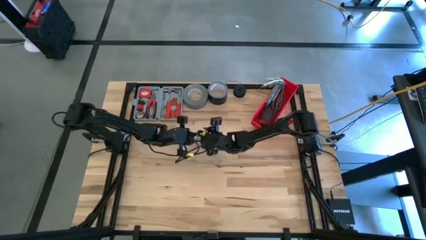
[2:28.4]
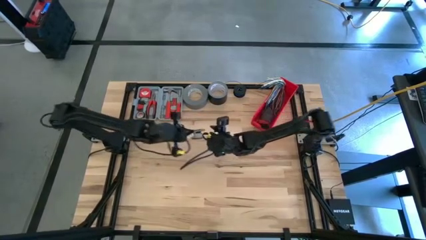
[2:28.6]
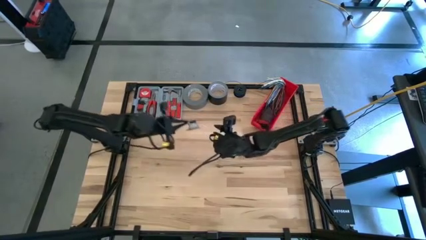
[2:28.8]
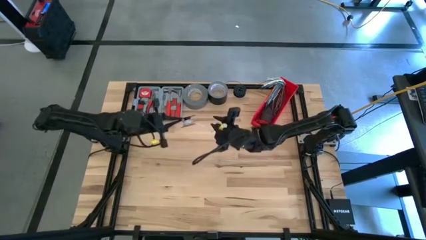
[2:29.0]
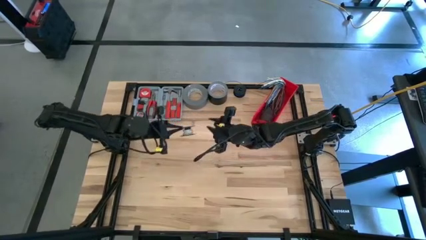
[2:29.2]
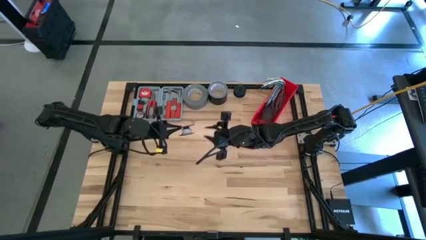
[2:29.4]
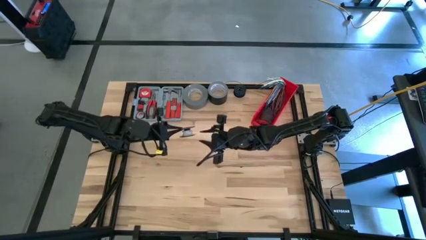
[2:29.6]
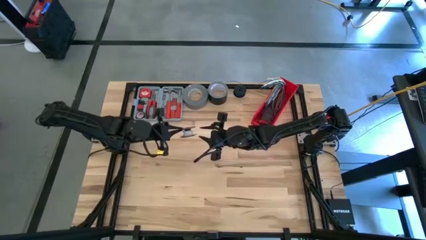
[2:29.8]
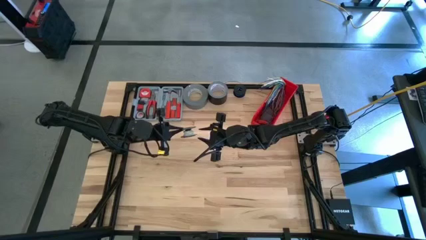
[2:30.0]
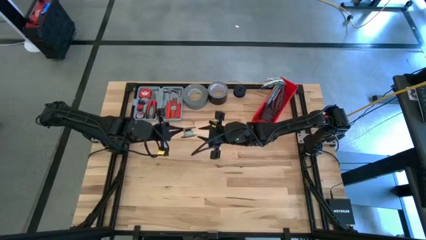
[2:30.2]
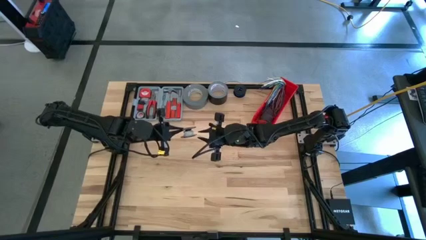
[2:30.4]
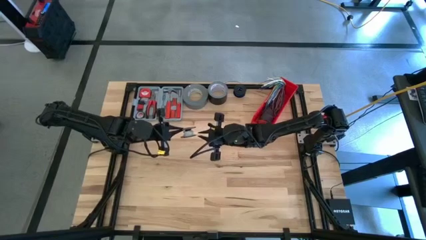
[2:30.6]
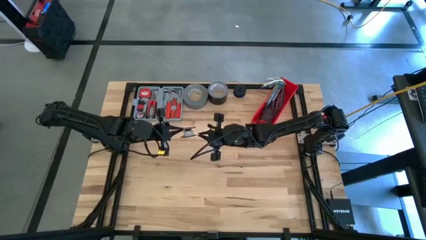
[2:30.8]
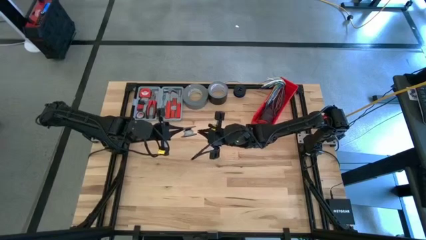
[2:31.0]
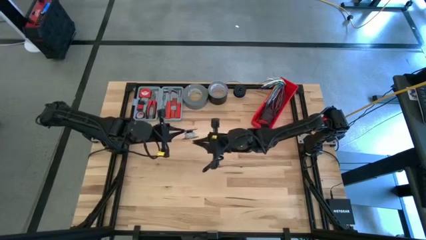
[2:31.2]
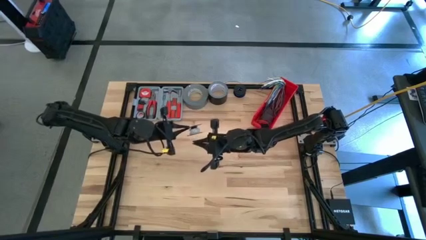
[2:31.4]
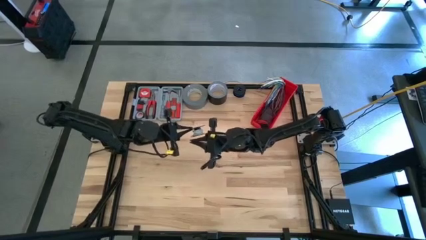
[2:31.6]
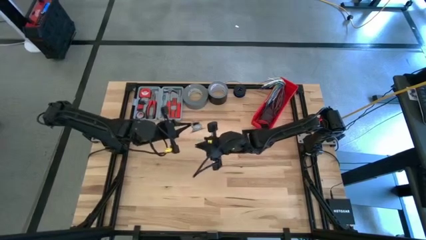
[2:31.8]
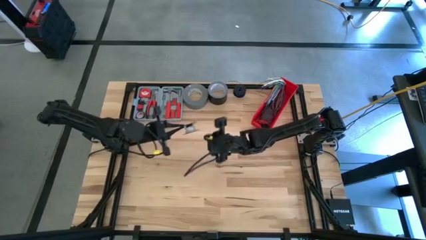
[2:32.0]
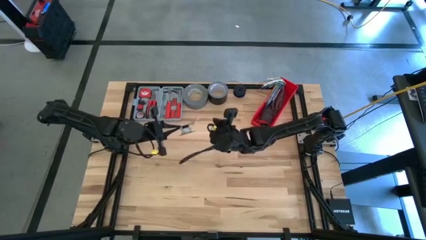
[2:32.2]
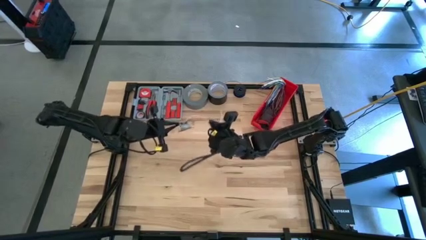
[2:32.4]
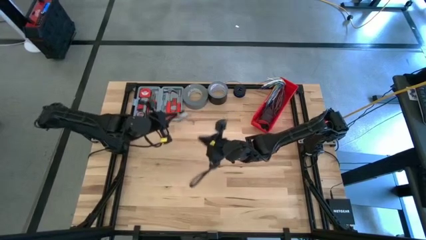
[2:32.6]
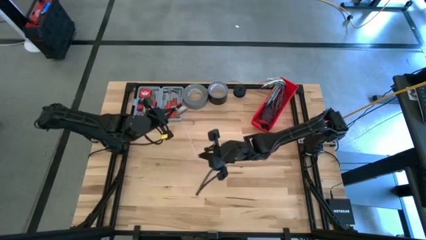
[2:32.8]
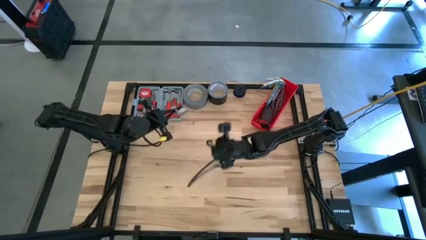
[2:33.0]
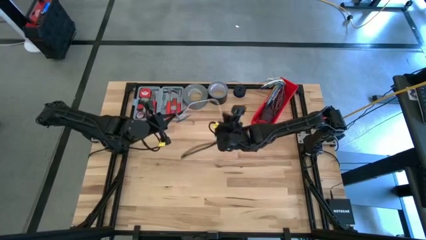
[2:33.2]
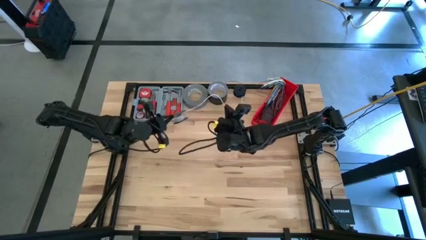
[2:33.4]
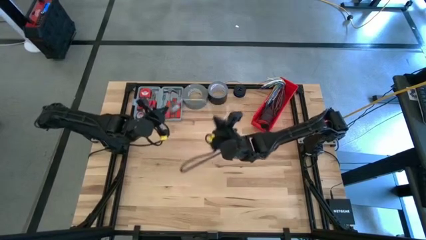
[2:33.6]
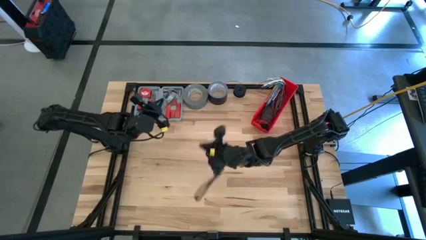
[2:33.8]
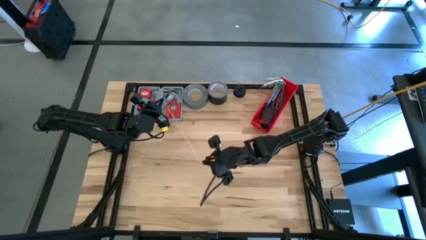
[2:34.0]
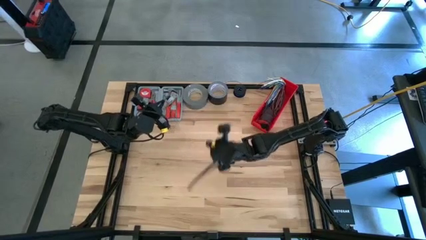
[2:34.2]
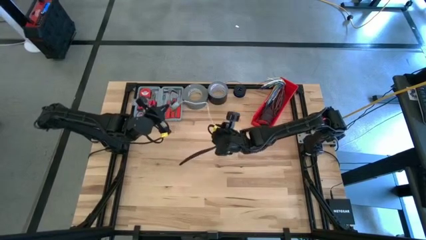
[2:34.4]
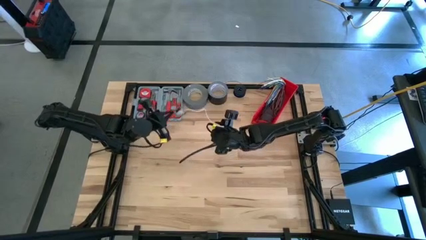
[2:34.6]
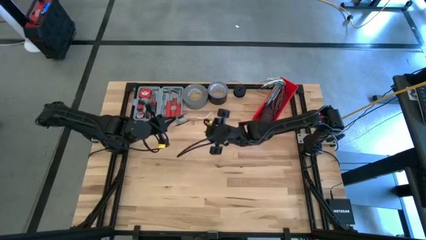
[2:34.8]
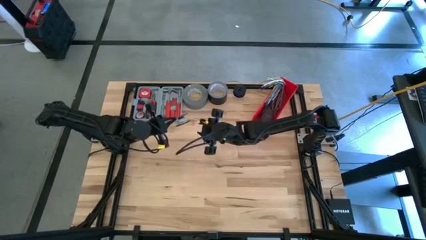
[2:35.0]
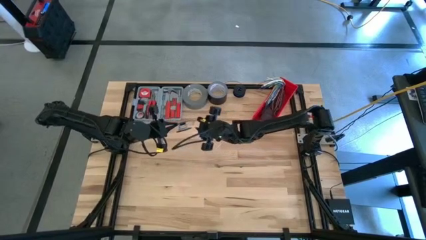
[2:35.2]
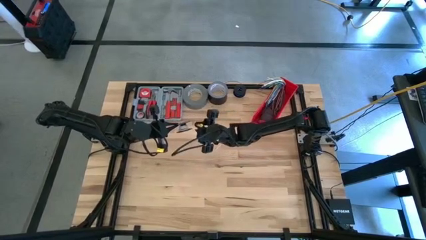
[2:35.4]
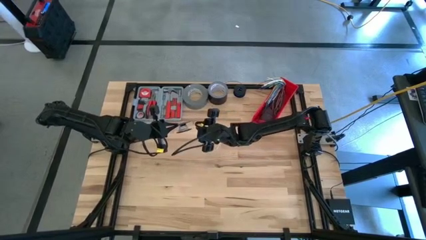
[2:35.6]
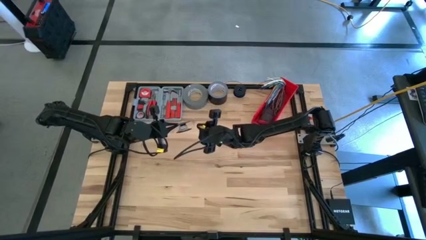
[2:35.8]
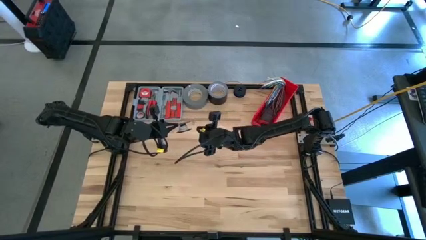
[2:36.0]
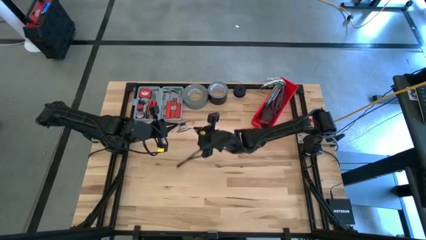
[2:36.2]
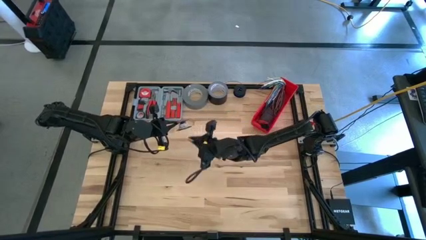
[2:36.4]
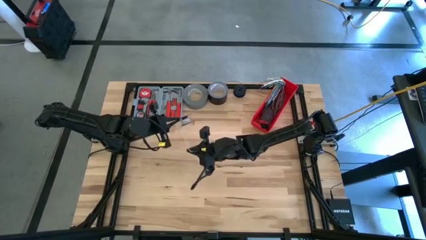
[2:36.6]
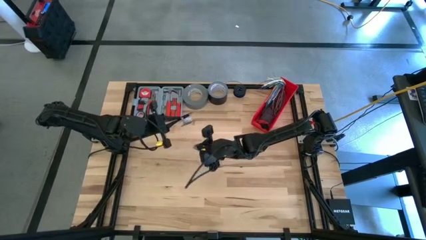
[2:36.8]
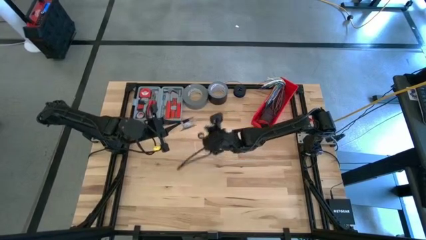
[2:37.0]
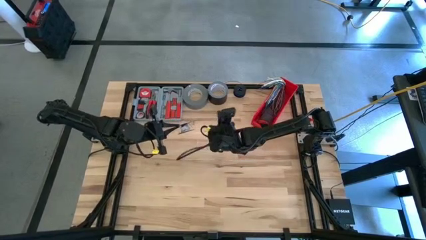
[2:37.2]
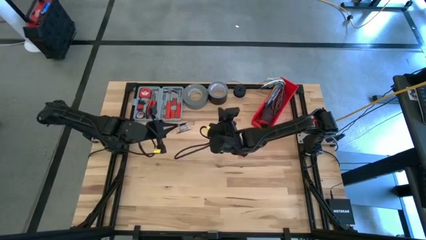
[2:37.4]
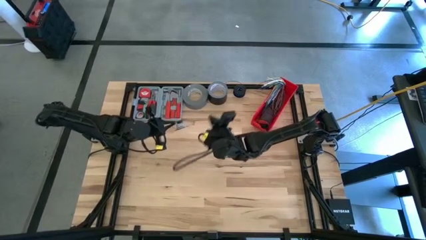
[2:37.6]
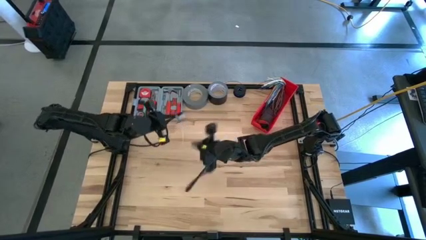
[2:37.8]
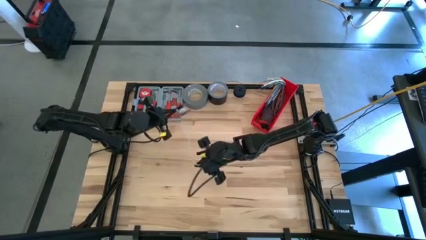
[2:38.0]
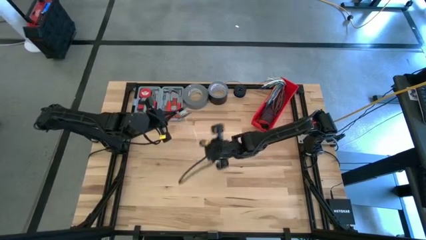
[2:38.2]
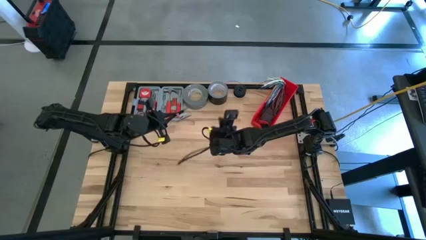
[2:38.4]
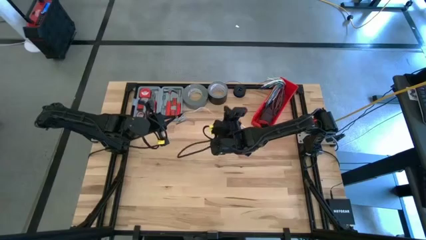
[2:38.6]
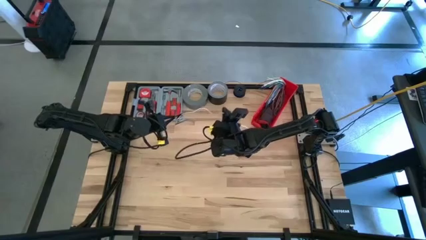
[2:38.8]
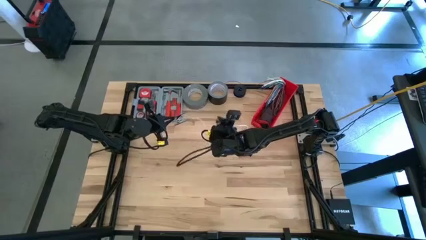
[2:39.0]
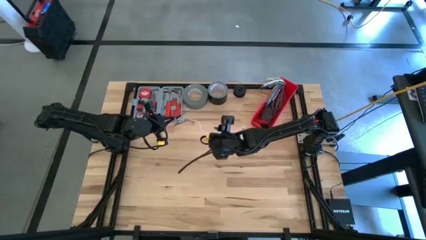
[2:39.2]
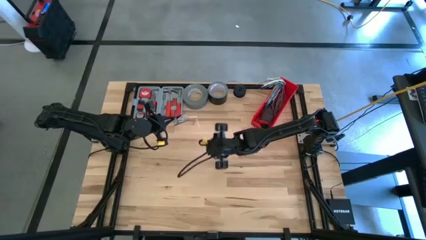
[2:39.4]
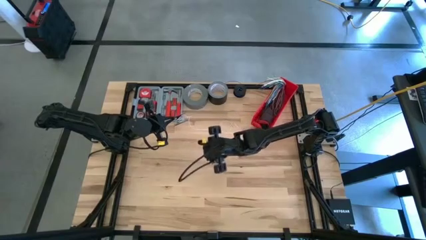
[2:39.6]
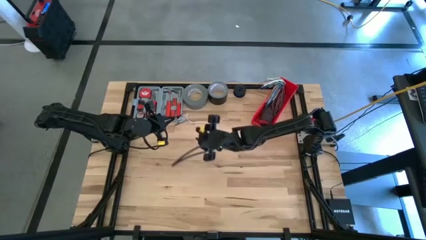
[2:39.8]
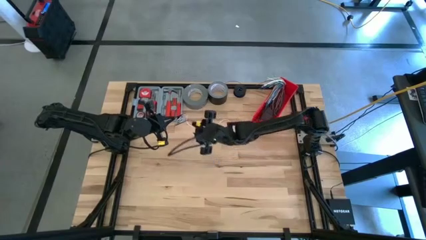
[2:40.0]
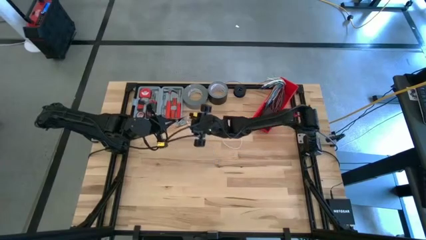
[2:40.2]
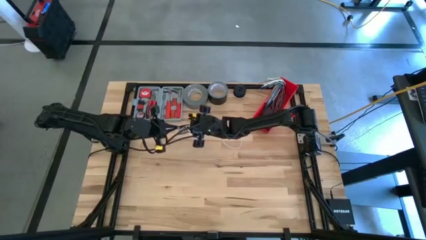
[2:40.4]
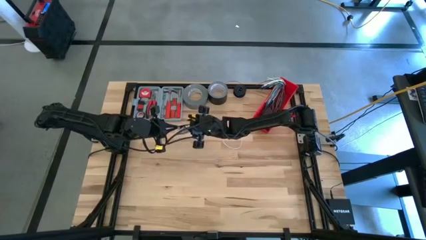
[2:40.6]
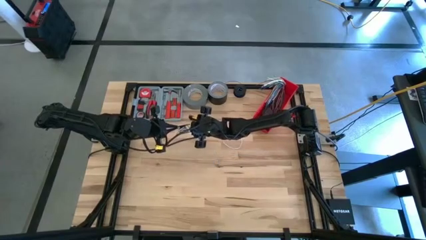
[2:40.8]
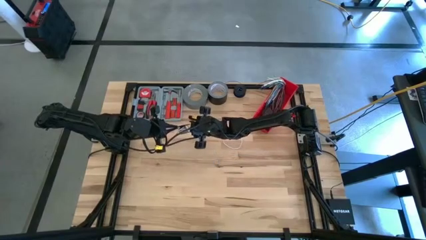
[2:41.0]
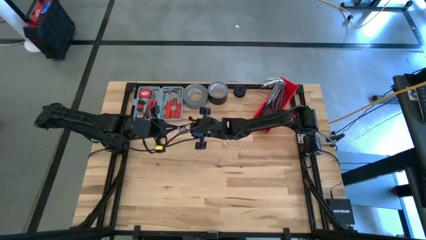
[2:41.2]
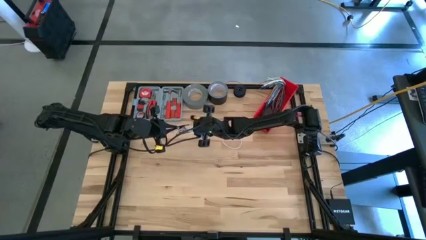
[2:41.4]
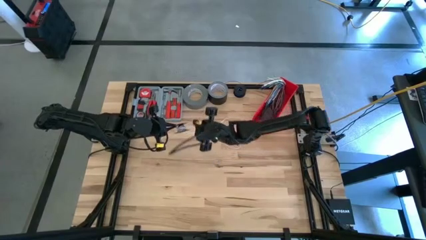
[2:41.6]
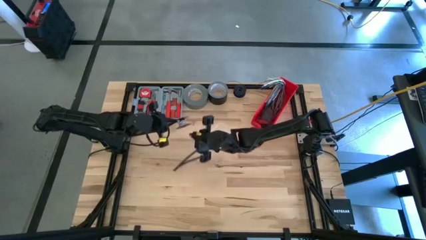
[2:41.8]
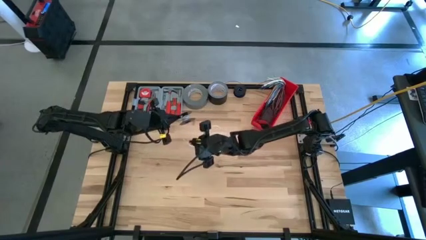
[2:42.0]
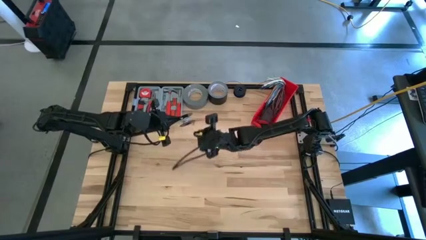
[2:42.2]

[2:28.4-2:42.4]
Task: Coil cords
Uncoil the white wire from the black spool
